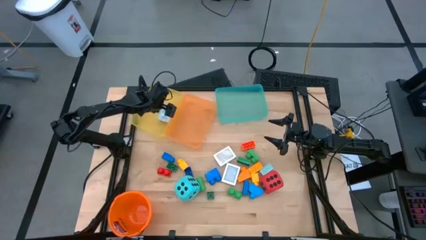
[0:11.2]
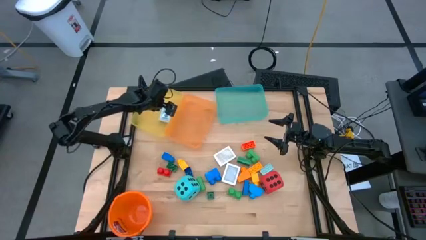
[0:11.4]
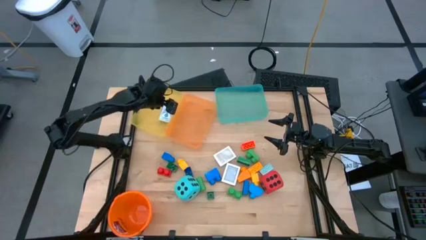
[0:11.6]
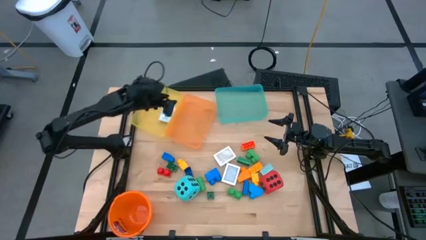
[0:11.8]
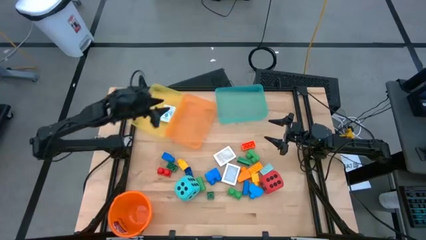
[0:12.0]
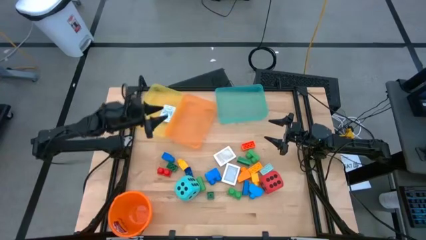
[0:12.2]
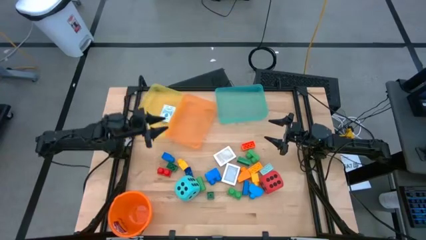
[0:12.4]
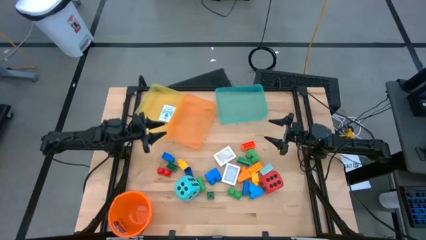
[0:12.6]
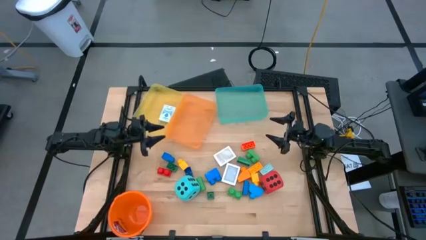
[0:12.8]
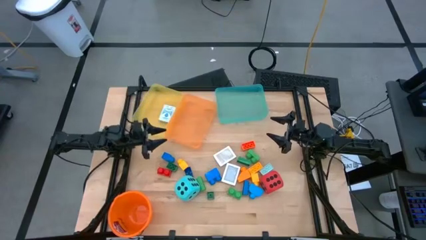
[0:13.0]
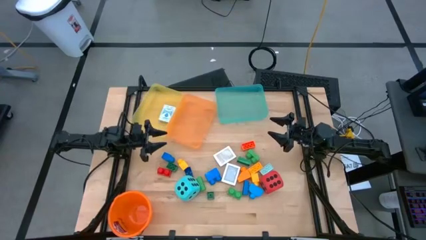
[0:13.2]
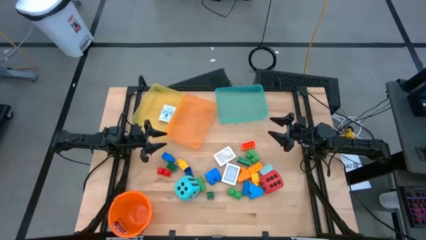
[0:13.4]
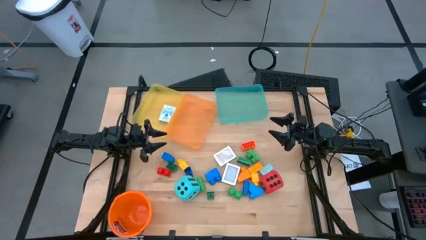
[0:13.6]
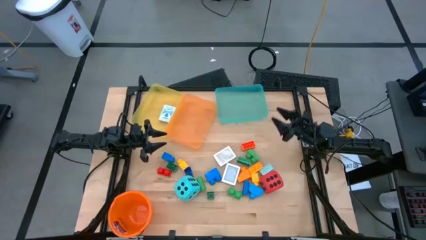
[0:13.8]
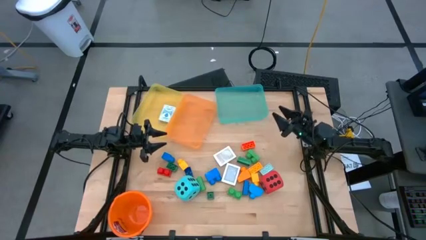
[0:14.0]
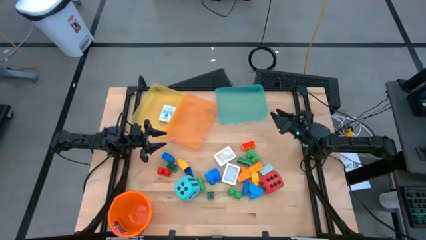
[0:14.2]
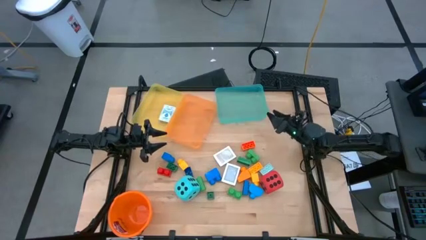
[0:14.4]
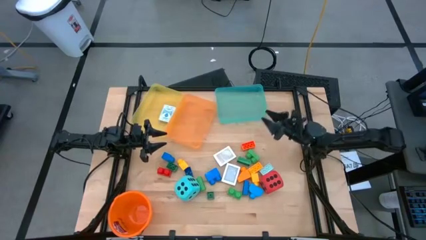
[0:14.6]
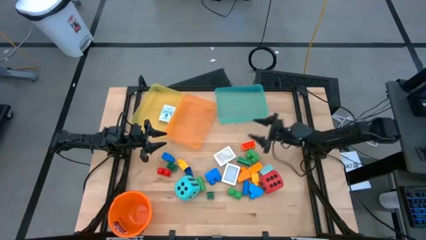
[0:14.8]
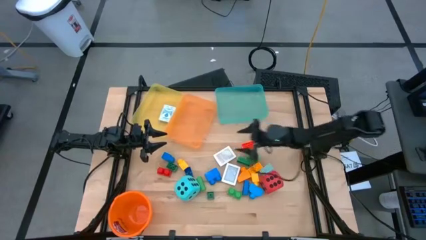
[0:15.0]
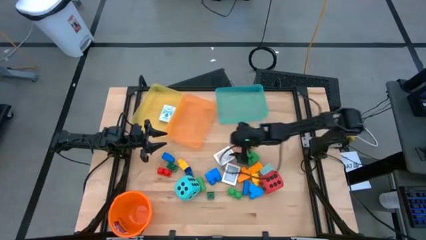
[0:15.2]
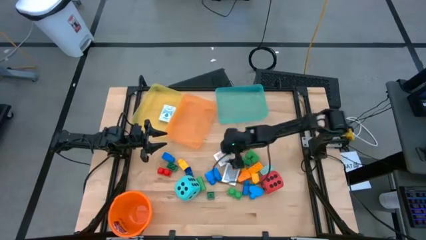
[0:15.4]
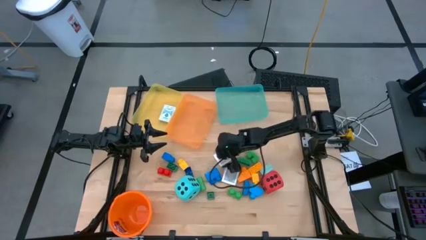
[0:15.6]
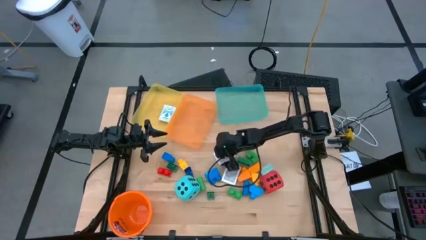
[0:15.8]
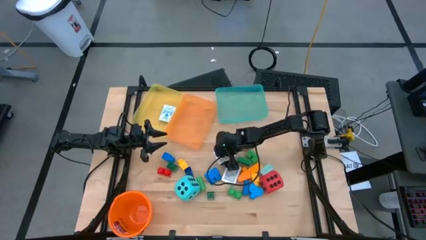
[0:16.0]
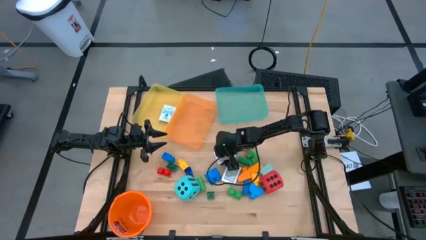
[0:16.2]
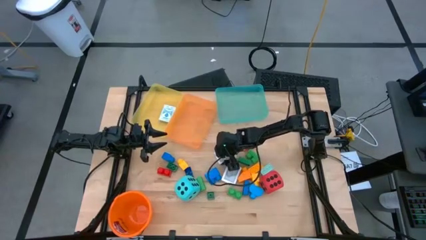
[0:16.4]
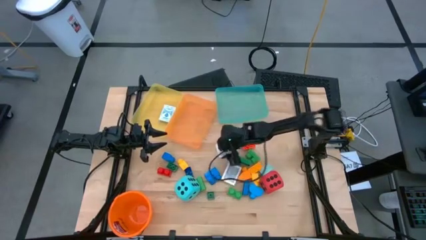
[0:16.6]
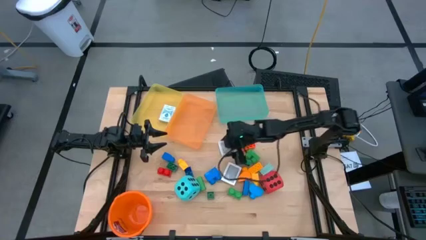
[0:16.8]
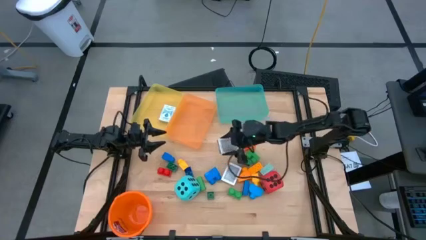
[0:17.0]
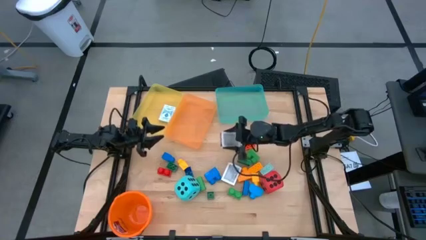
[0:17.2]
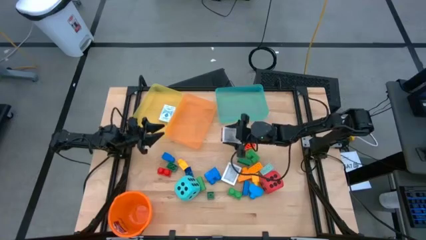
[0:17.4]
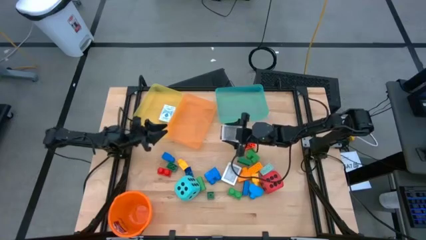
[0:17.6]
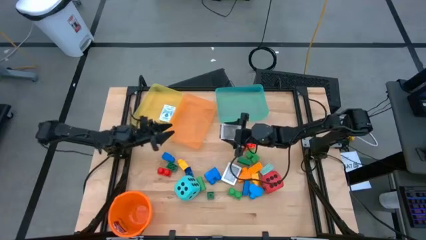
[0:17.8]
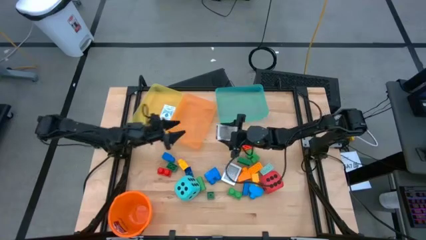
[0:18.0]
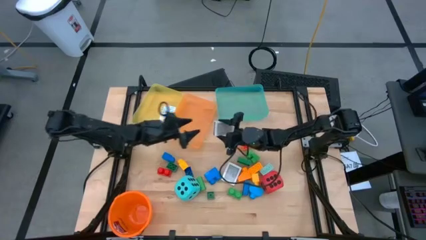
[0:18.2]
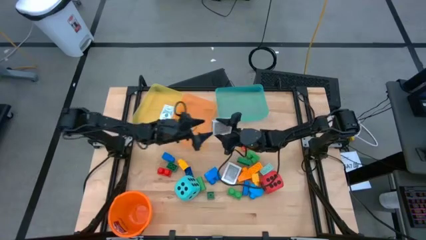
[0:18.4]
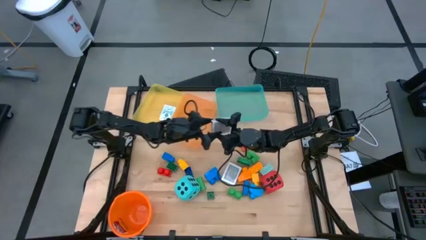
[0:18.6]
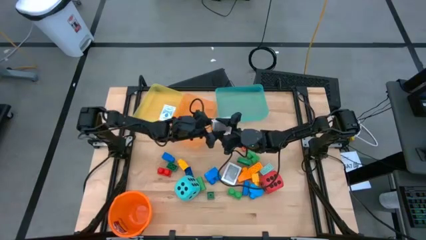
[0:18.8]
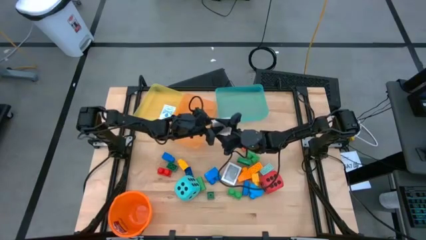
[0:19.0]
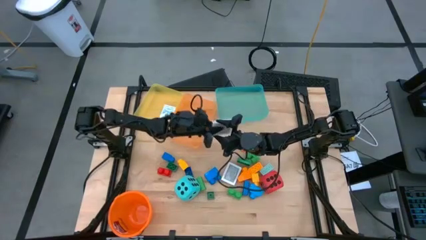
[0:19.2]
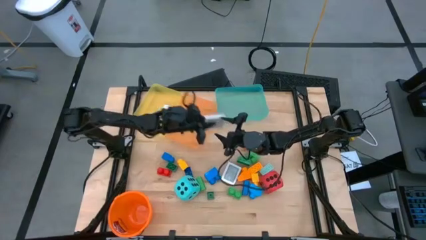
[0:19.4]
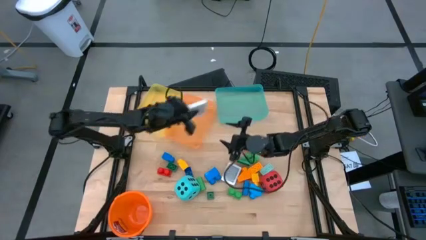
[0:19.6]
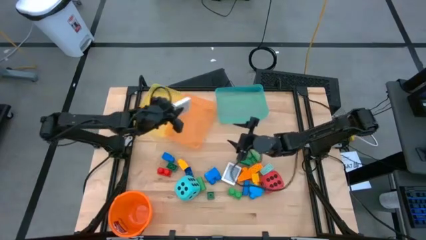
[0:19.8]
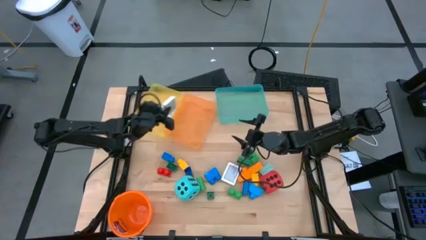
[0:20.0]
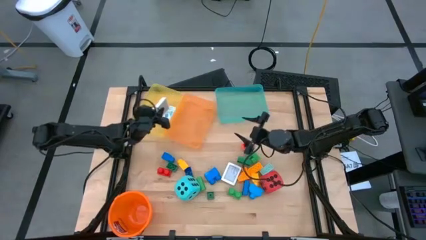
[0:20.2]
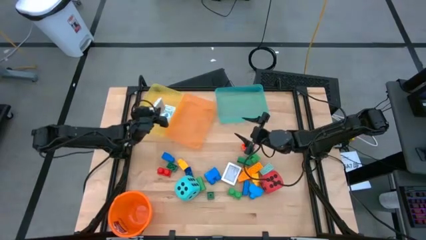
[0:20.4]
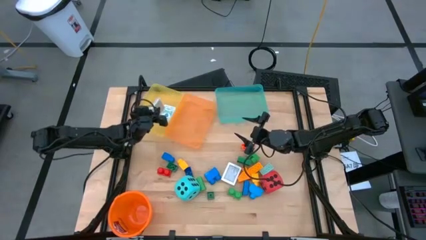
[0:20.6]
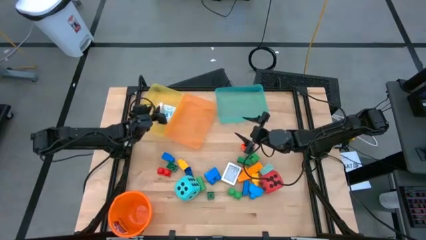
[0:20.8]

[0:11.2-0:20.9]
Task: Pick & Place Toys
Put the brown deck of cards into the yellow bin
